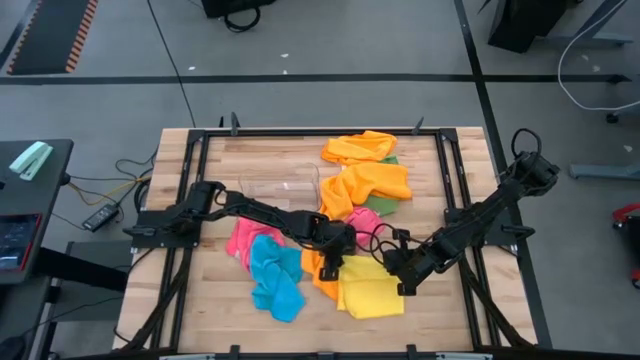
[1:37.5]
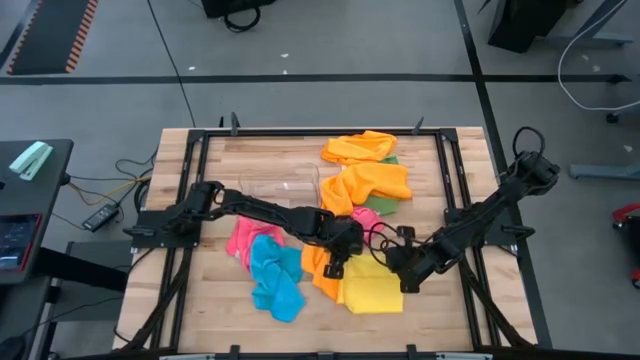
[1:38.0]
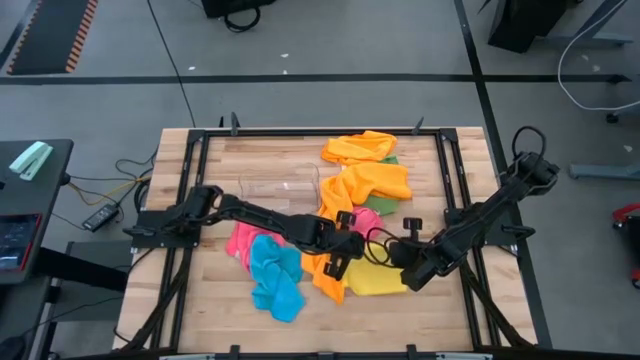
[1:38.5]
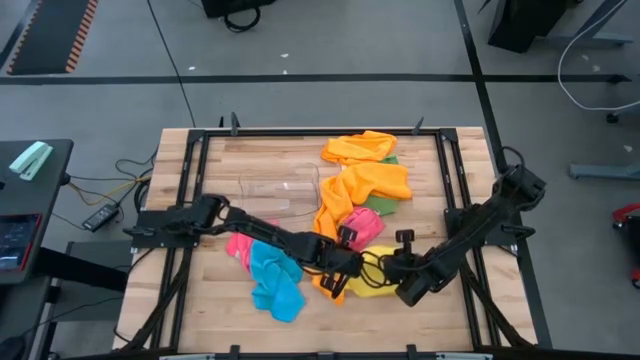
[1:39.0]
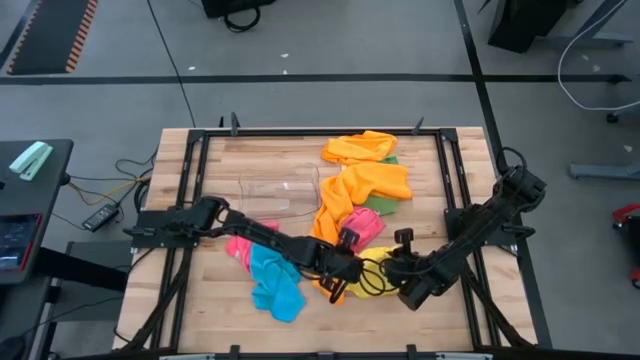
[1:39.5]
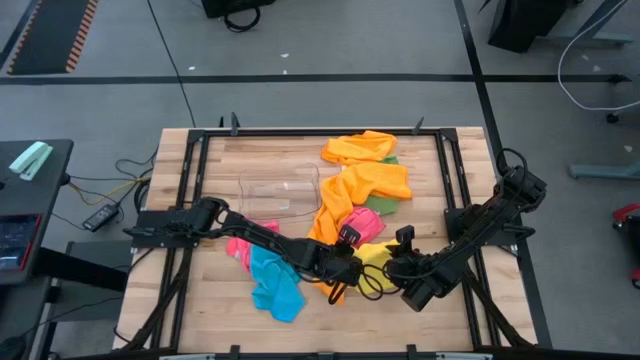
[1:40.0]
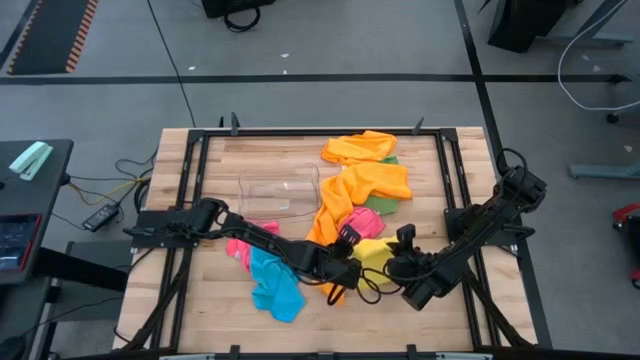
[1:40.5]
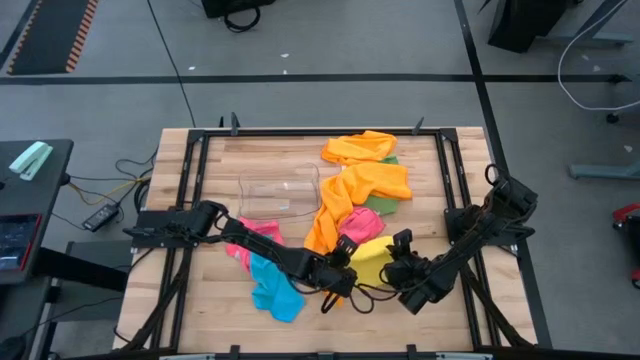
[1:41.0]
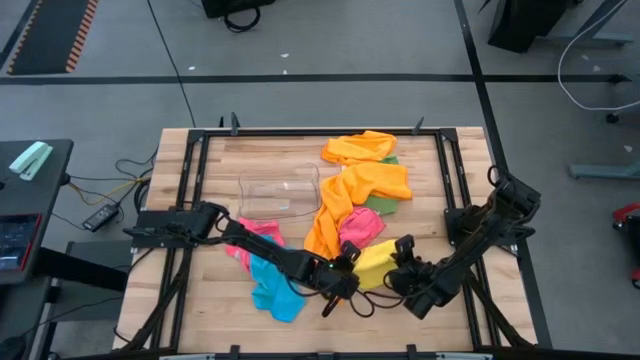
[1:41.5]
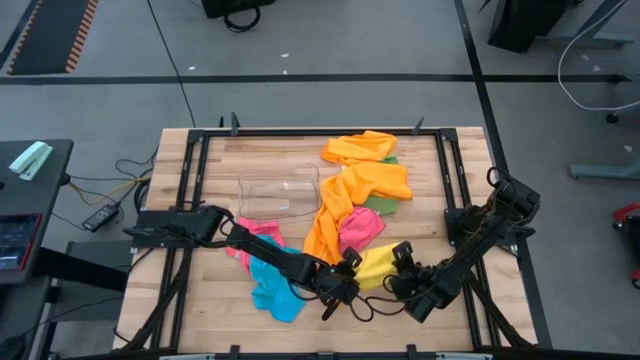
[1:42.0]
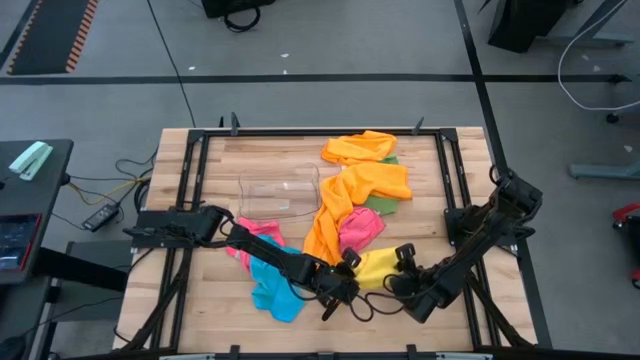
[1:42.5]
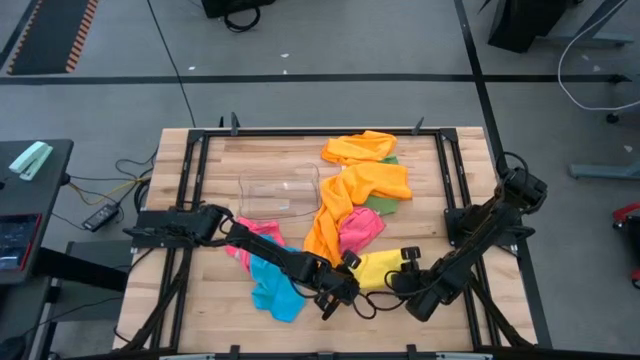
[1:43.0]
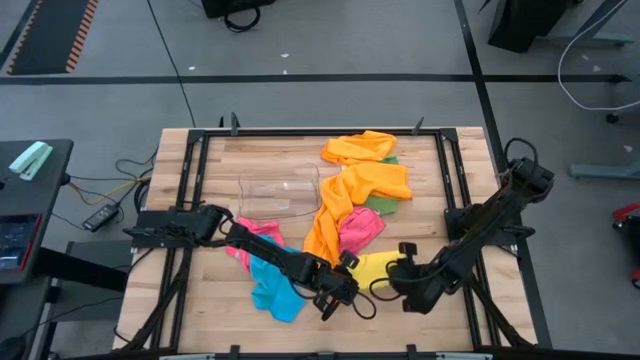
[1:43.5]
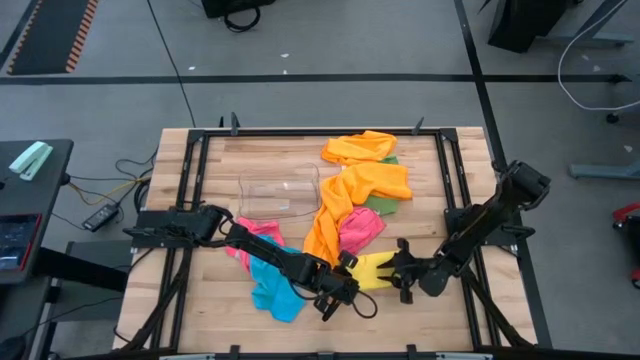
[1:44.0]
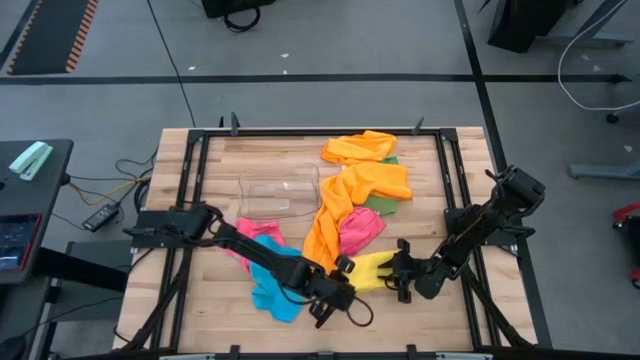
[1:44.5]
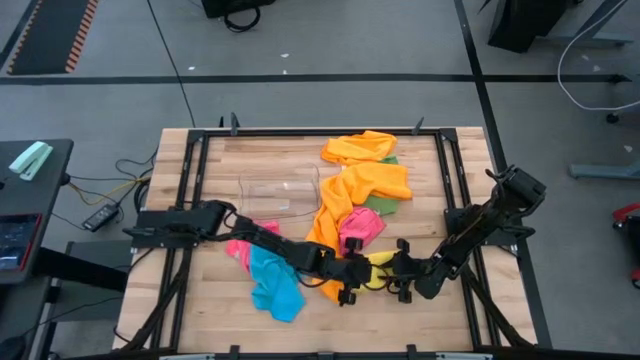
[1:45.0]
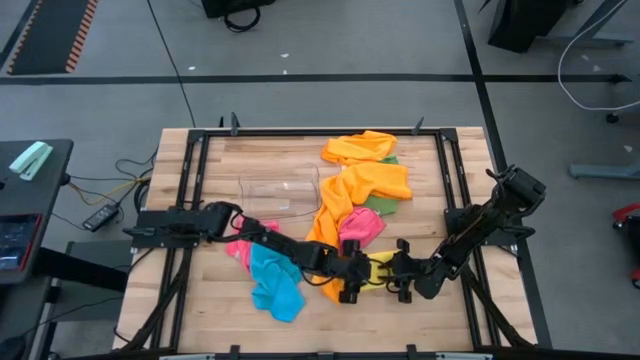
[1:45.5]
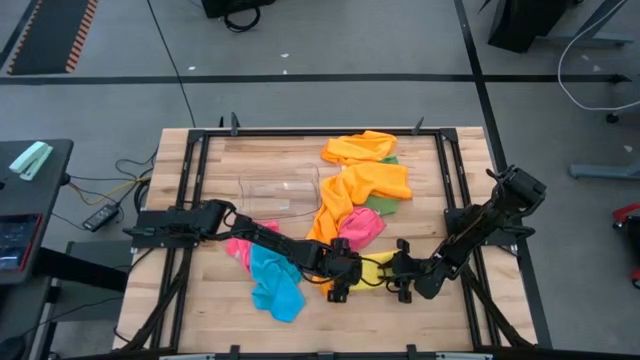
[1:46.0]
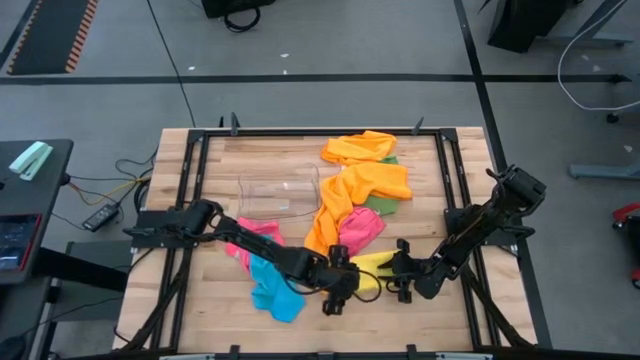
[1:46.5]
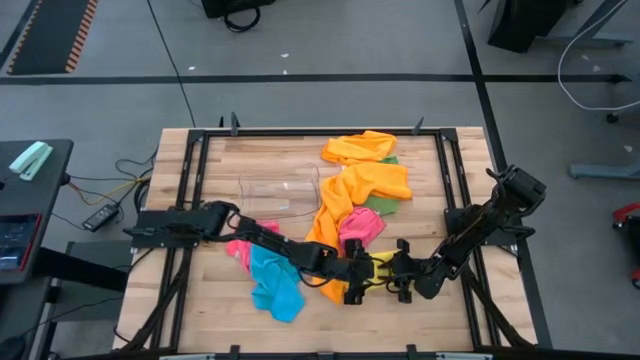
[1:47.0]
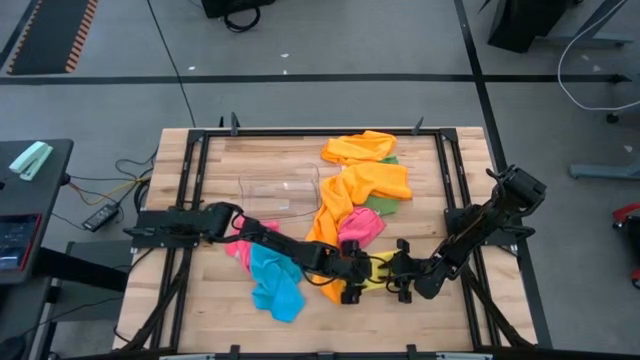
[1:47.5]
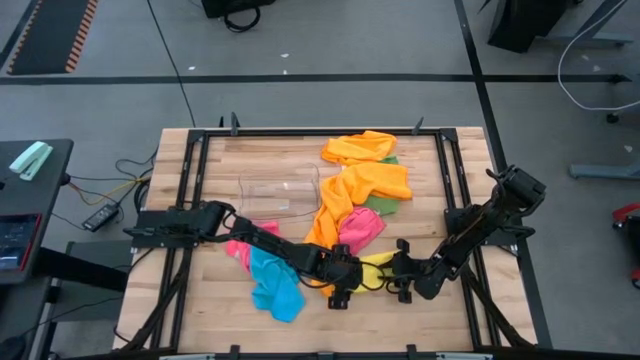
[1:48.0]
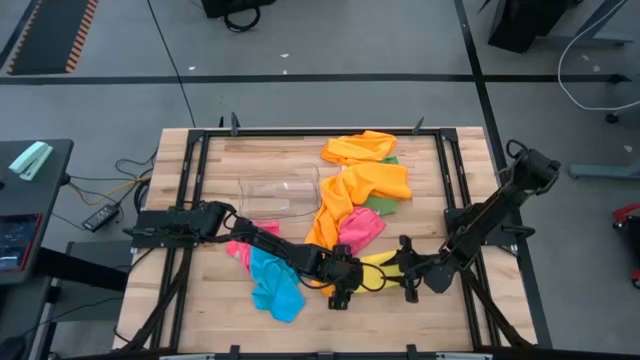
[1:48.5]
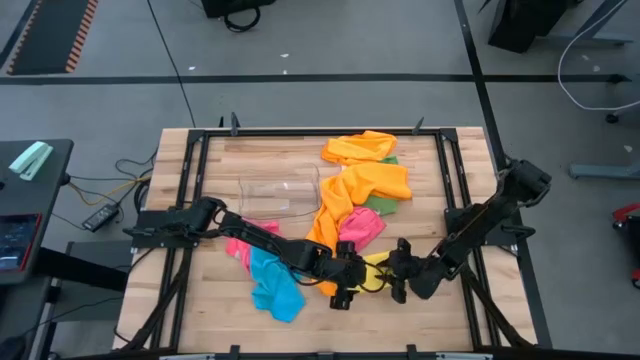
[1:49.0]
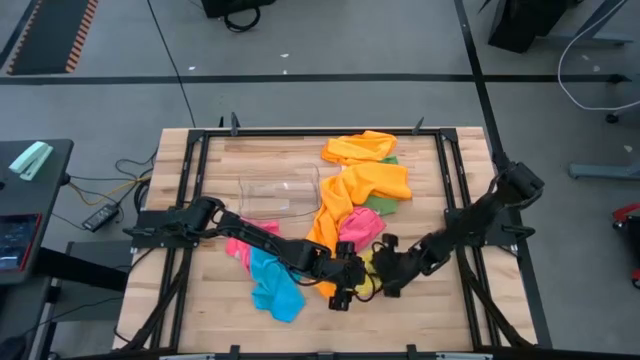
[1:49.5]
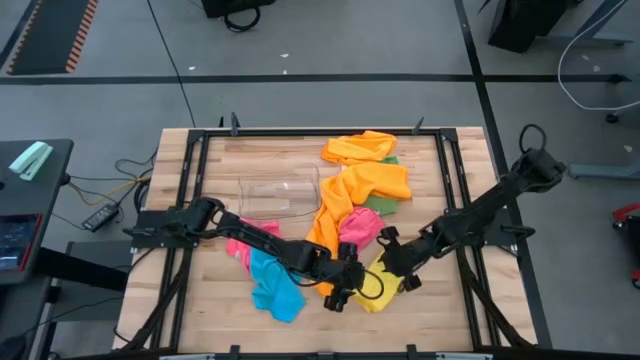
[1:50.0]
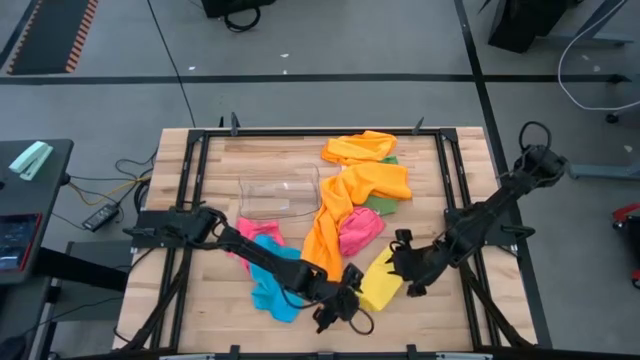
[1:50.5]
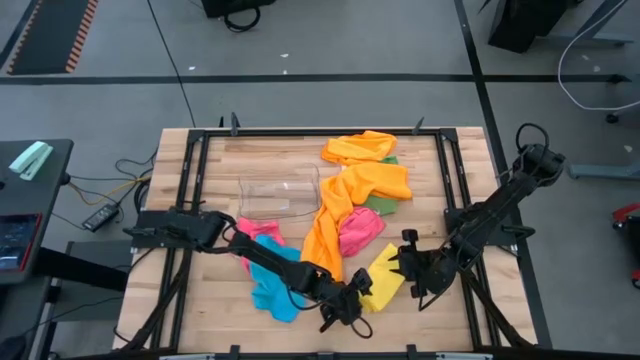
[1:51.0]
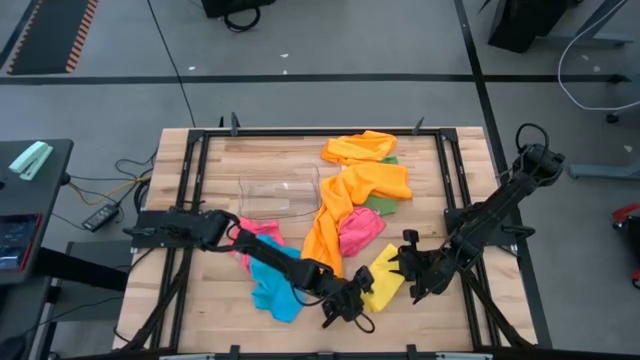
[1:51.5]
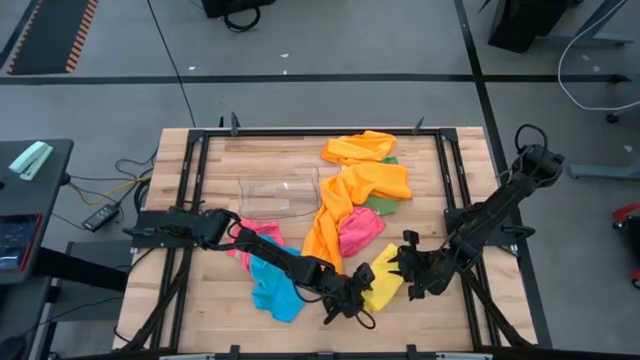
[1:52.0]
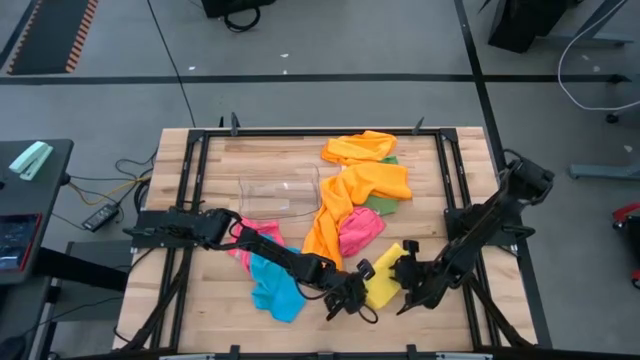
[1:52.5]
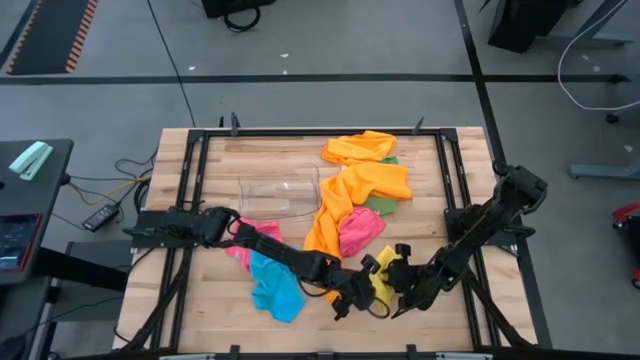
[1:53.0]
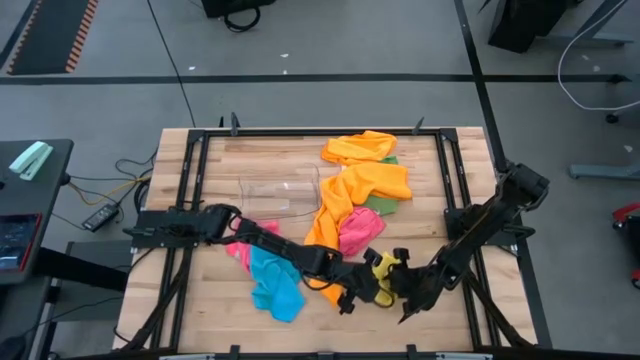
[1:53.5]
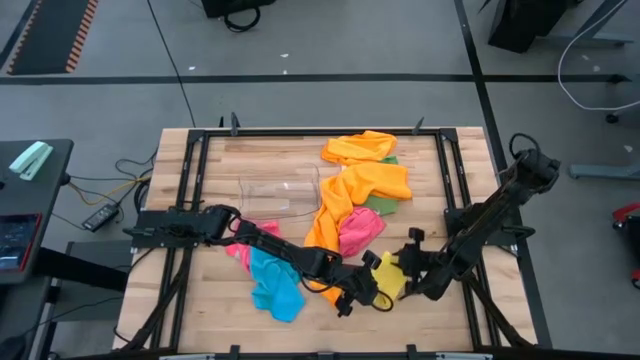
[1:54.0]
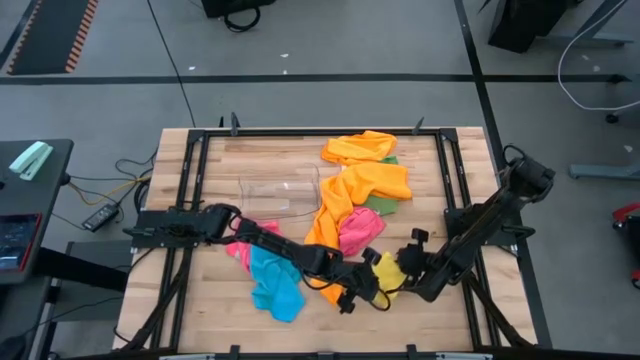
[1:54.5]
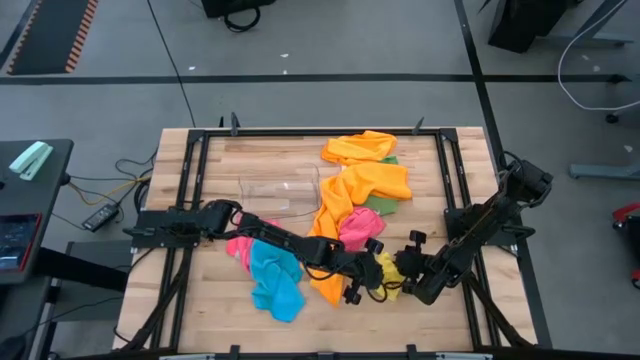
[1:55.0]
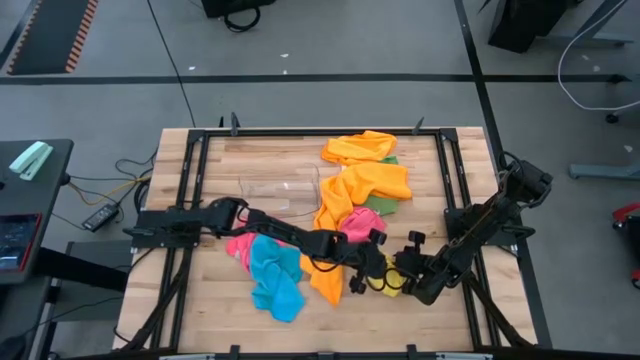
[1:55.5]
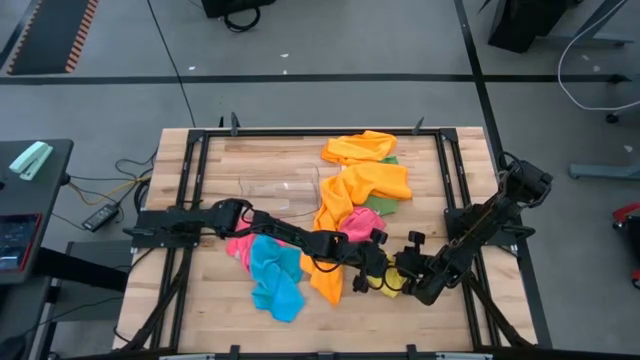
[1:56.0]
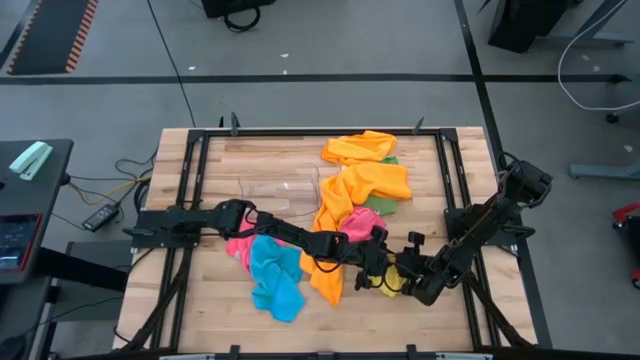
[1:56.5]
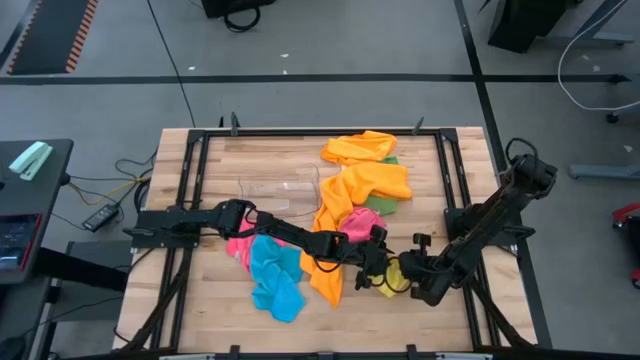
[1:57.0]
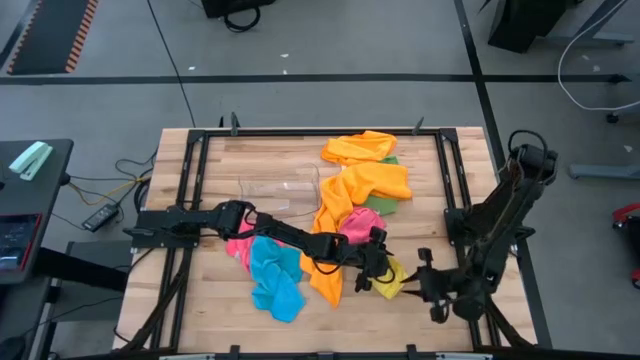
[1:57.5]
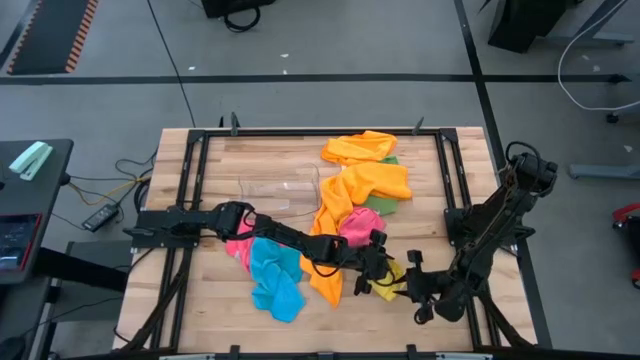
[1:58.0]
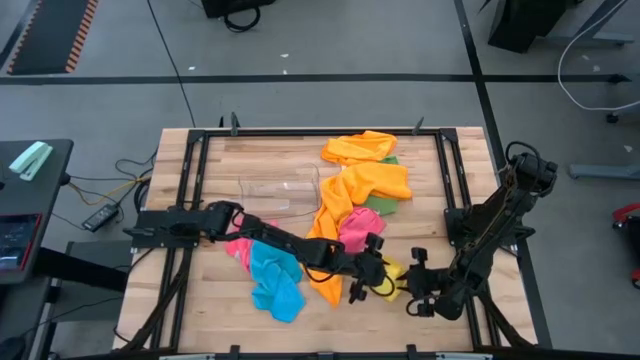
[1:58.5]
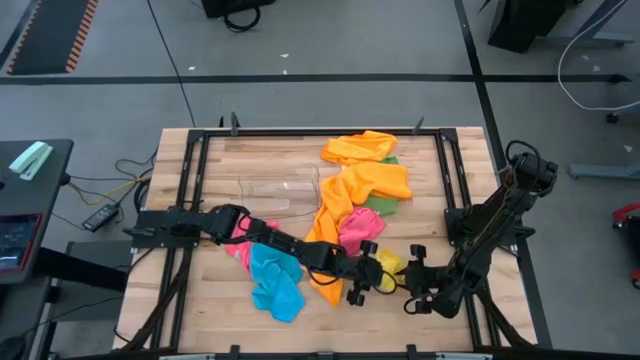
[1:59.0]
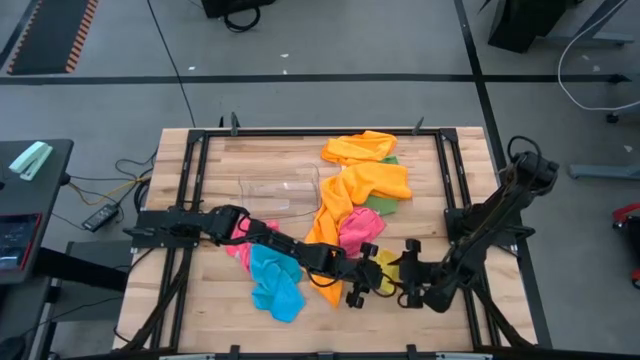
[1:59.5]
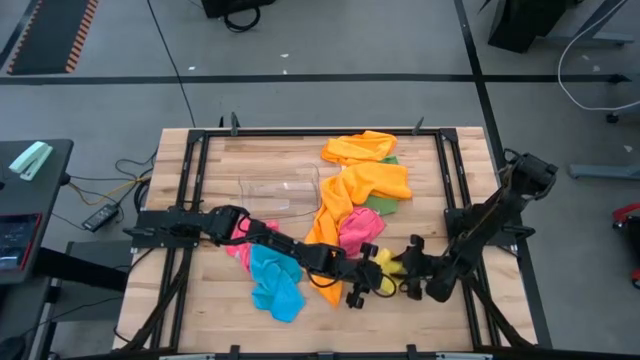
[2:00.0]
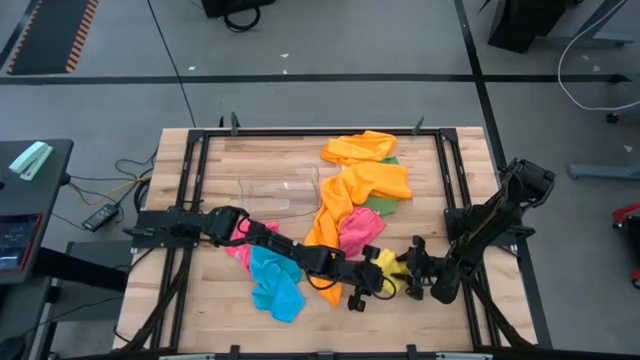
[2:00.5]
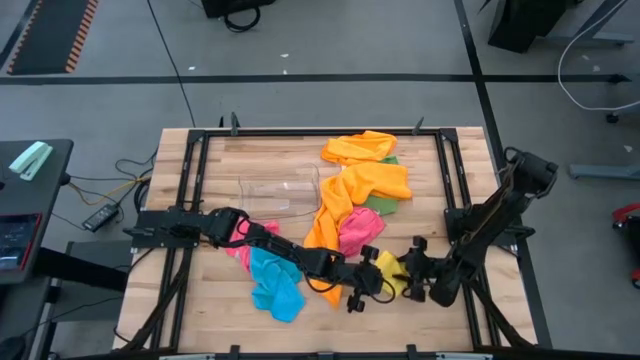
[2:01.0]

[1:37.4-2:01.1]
Task: Fold microfiber towels
Fold the yellow microfiber cloth
